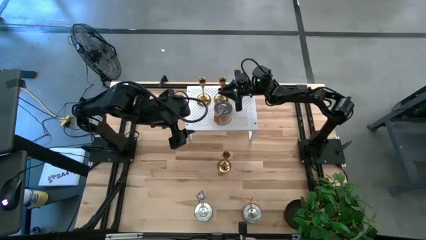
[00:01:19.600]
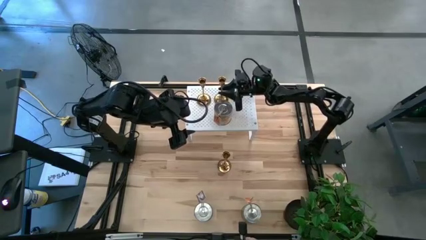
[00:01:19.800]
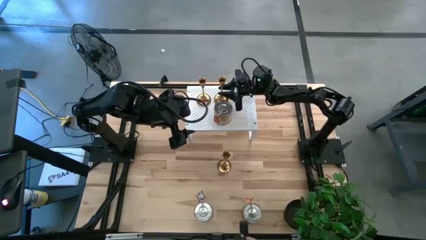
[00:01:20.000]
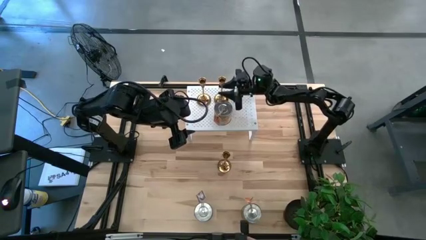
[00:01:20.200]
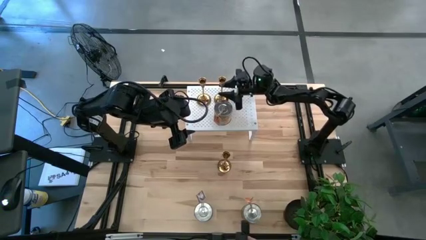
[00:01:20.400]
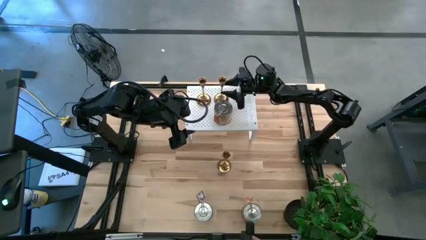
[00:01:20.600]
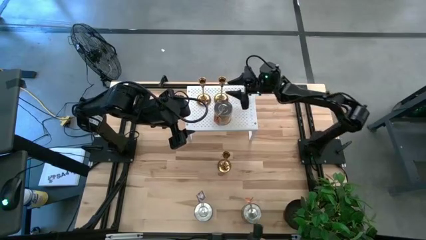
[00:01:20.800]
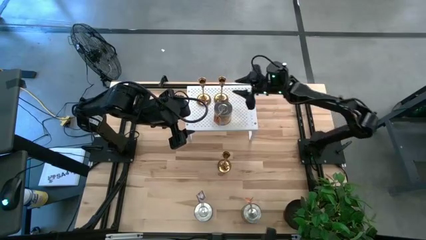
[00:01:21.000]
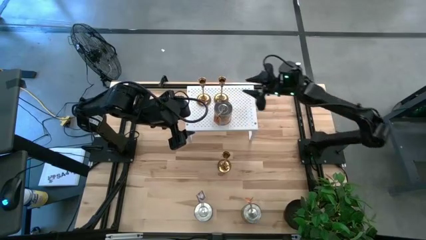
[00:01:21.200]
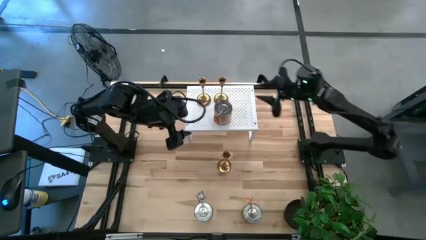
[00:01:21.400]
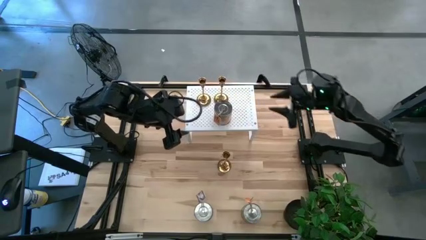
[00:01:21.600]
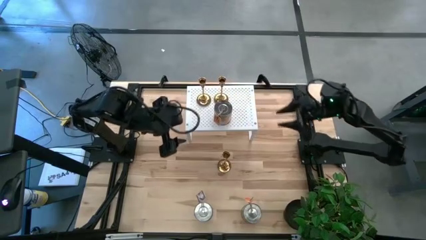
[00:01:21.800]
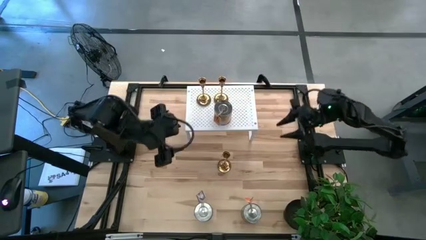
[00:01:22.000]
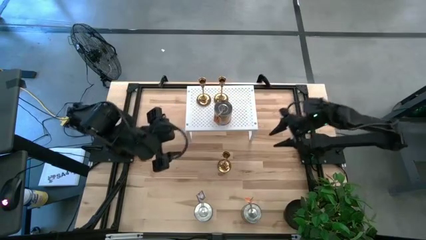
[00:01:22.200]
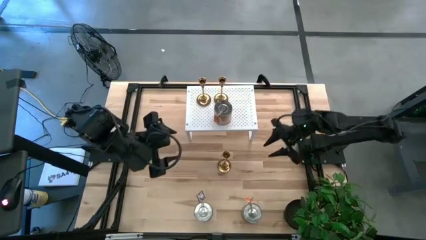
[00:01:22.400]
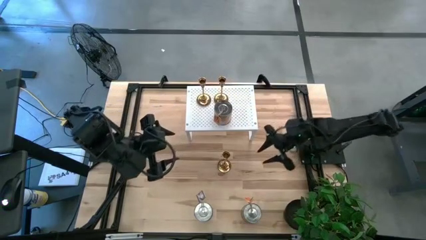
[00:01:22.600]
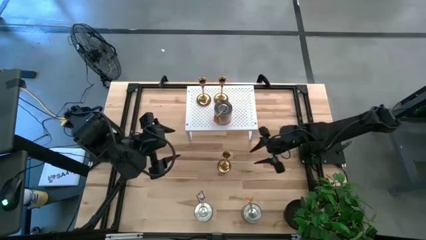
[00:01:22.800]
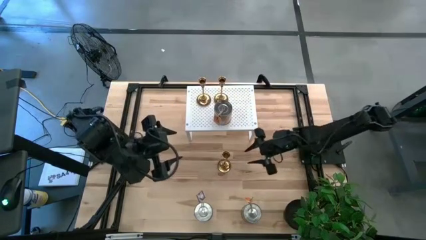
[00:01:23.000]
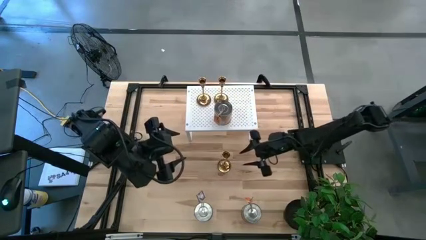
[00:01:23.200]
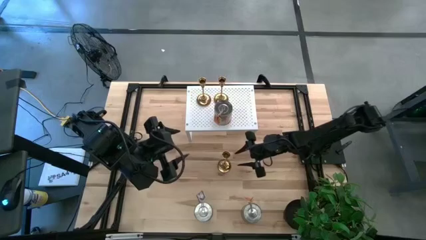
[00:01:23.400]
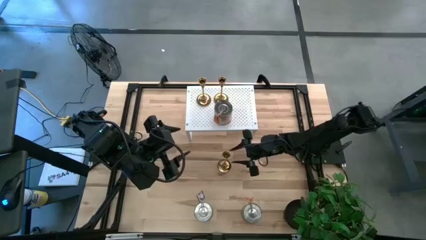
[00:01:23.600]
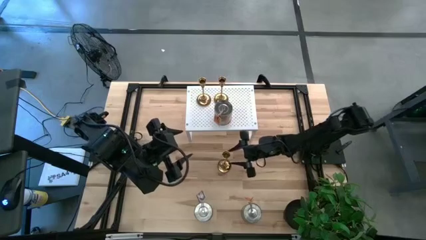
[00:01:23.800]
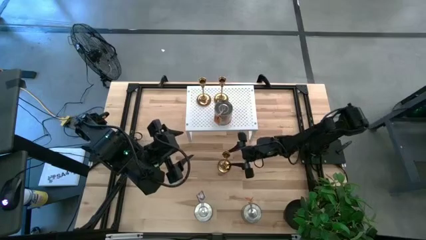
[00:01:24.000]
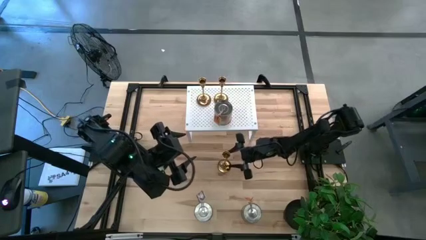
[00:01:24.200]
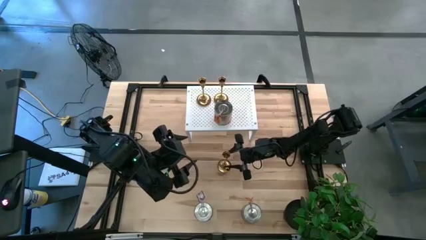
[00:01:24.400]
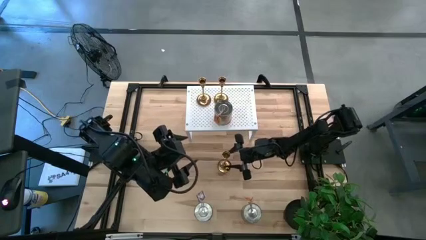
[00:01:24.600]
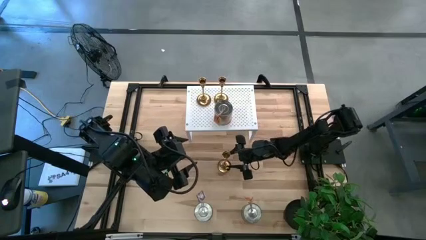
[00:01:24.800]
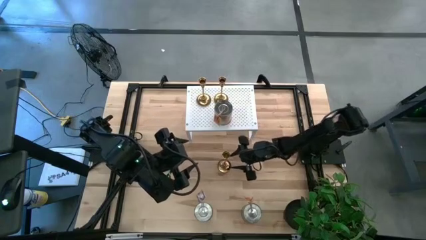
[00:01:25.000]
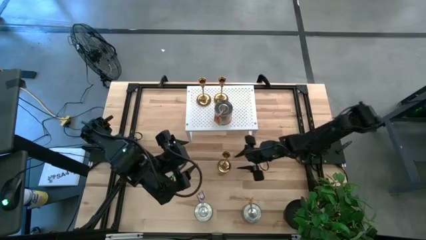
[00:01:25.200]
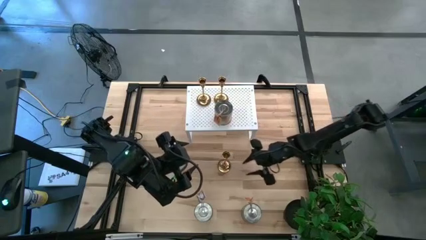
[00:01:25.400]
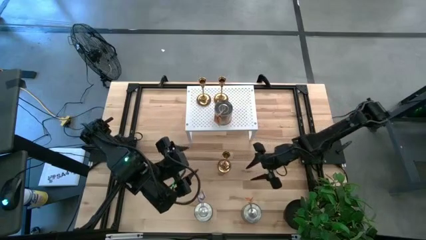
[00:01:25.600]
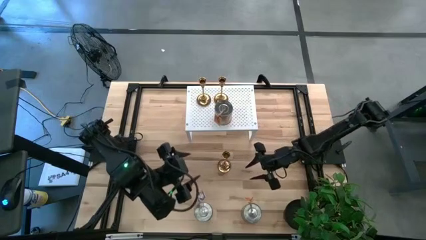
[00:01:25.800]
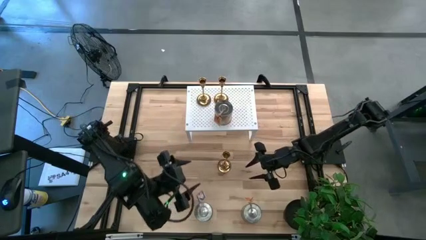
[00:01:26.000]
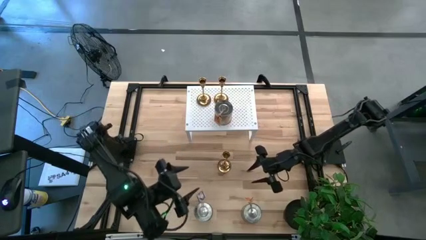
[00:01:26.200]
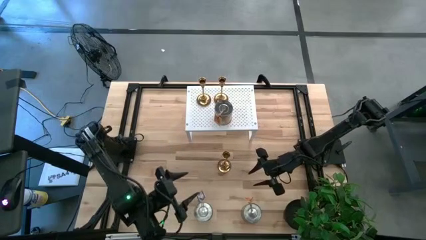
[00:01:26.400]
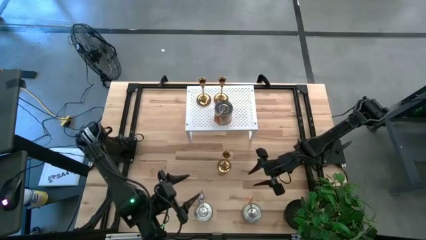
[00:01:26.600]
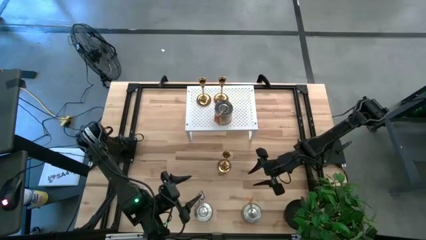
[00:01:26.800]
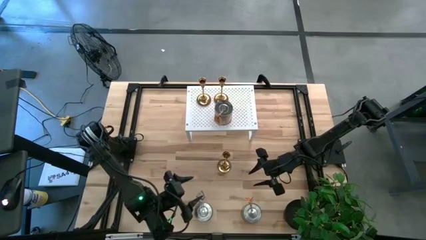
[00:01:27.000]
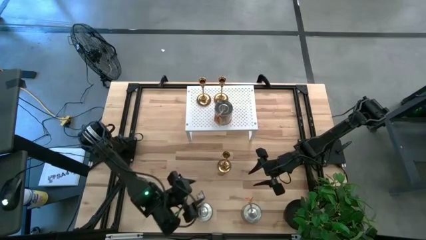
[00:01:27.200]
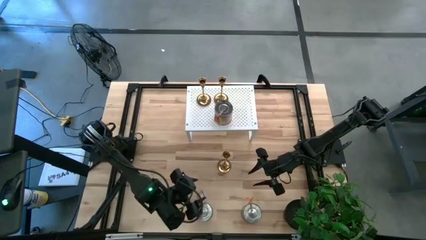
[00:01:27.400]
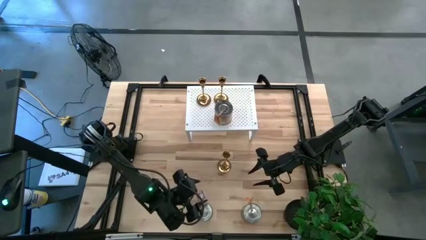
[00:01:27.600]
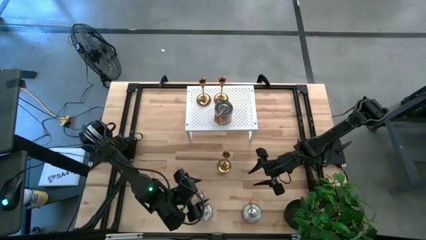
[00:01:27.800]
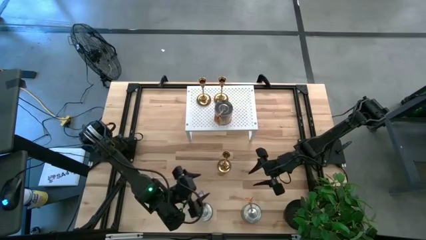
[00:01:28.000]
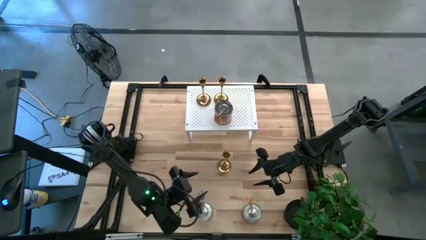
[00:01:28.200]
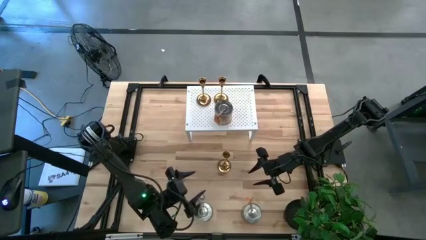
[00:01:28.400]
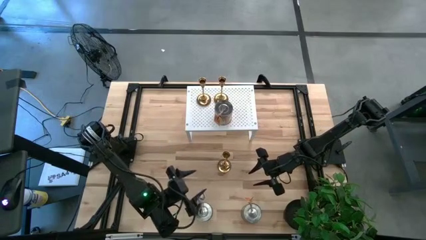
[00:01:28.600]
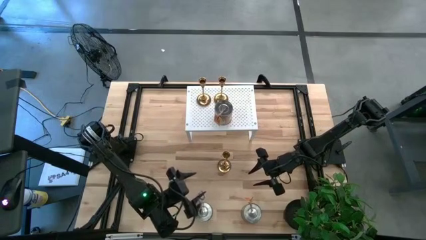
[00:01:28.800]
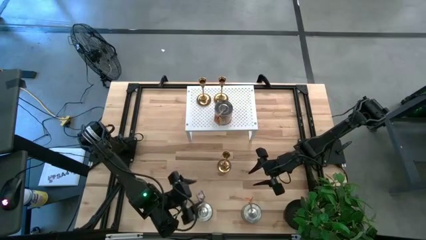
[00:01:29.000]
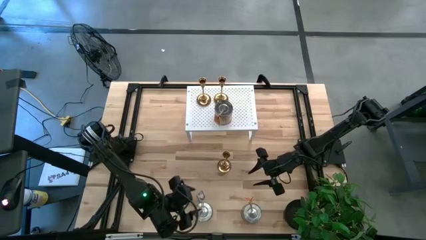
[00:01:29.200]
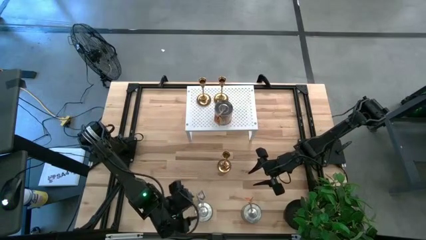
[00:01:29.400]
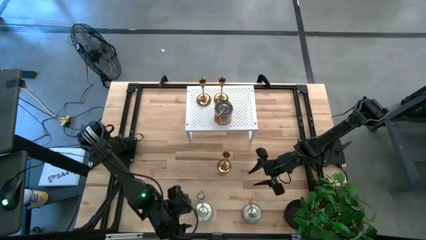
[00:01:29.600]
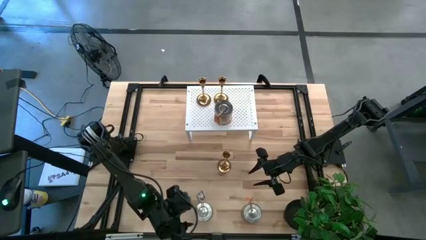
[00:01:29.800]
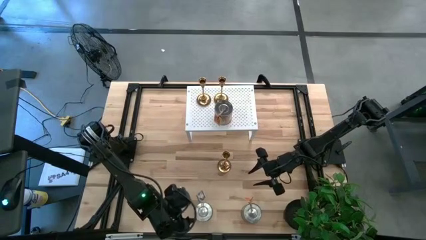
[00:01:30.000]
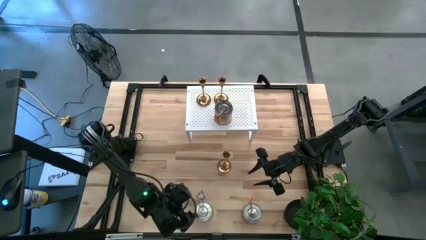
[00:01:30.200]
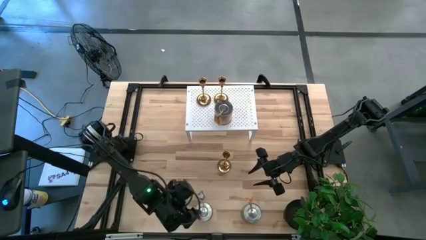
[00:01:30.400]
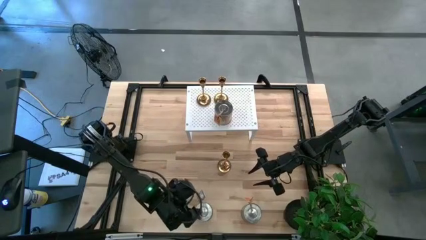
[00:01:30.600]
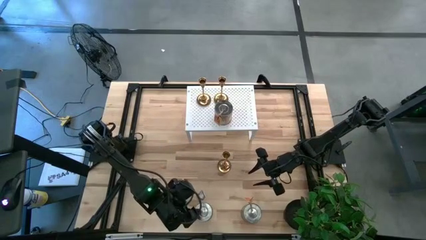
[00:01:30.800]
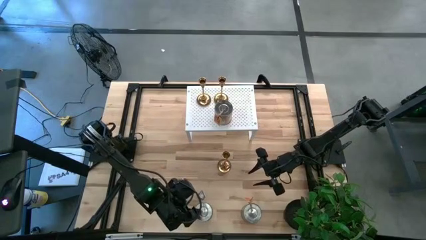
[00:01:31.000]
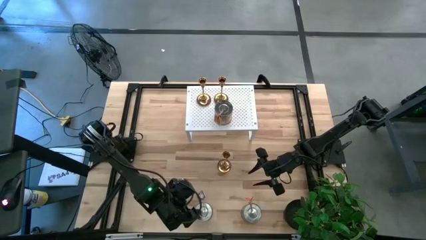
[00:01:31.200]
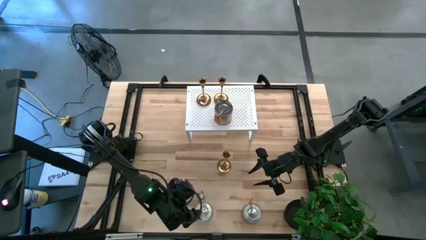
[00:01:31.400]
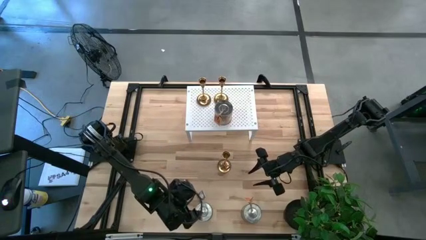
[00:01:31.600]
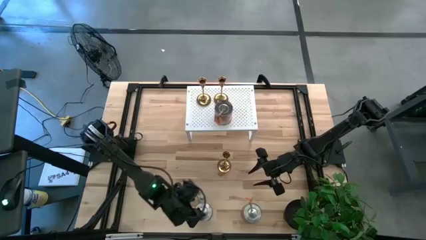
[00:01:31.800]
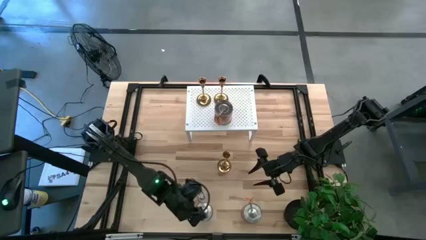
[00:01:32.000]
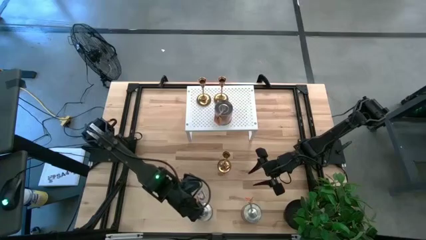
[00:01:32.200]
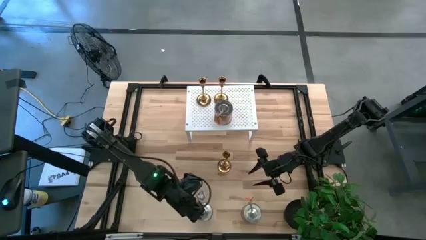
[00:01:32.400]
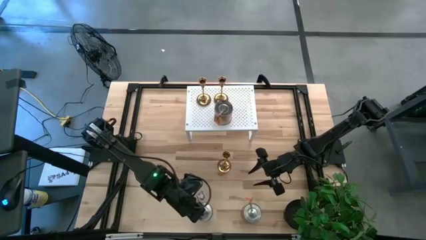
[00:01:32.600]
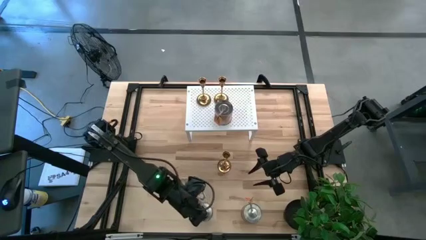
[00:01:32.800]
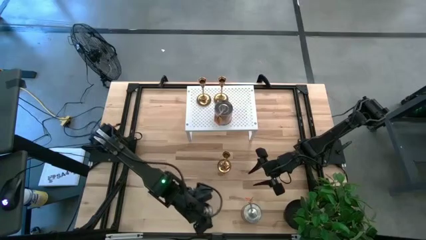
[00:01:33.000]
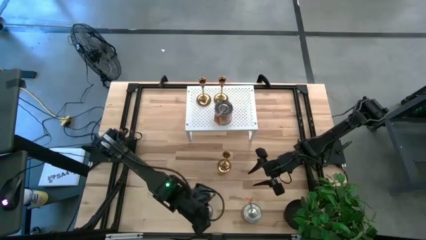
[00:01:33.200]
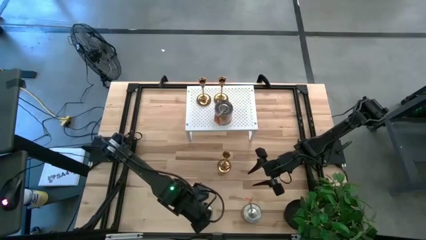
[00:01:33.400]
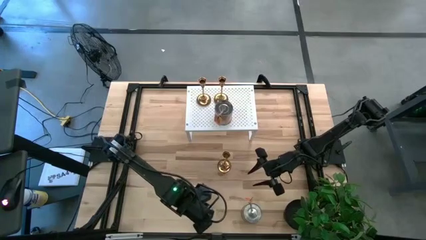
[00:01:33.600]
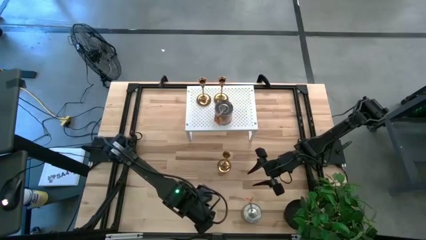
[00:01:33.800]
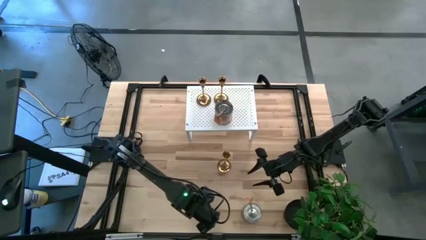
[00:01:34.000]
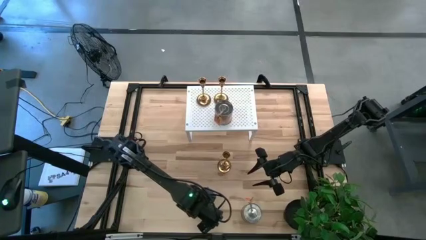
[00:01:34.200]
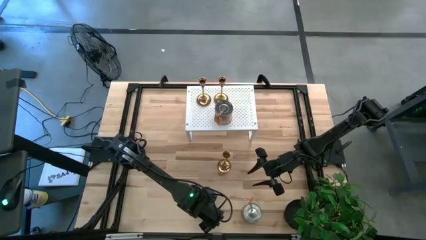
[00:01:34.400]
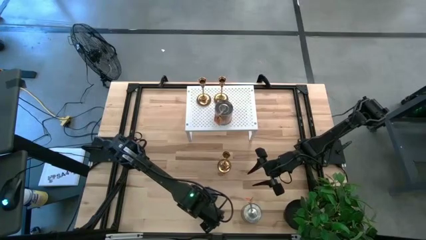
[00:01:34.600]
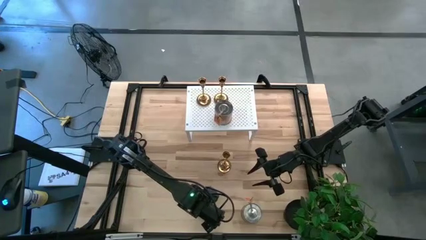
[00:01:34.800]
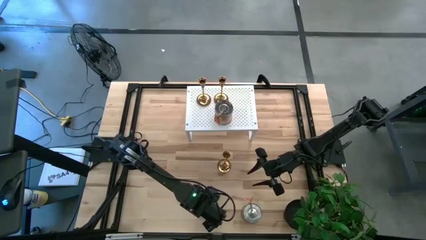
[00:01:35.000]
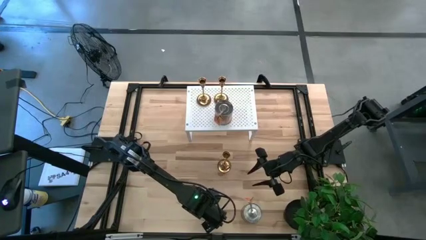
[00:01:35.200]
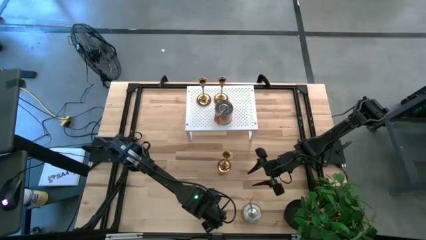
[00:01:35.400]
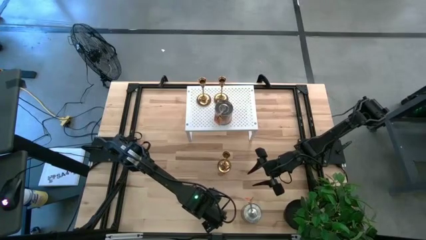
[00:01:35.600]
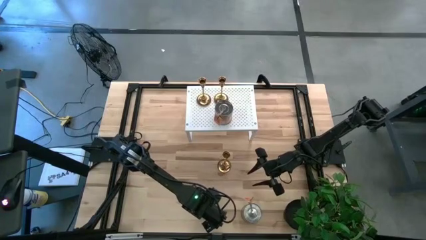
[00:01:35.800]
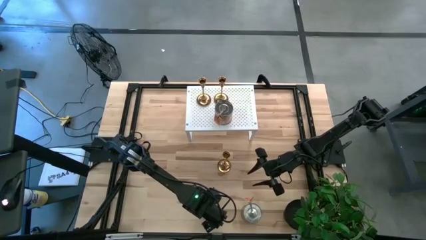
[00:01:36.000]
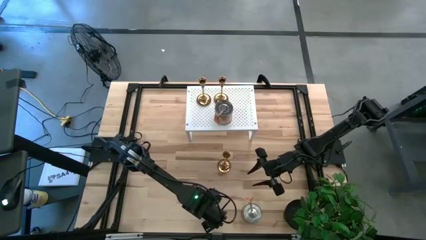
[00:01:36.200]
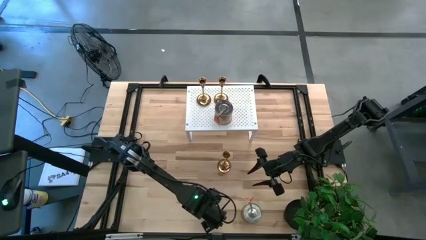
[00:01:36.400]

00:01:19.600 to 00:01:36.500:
Task: Pick & Place candle stick holders
Put the left silver scented candle on the shelf aligned with the other silver scented candle
